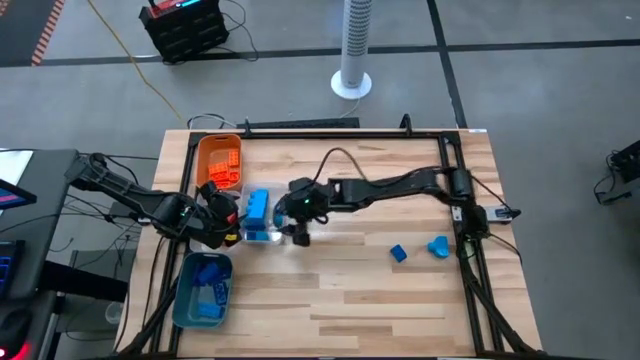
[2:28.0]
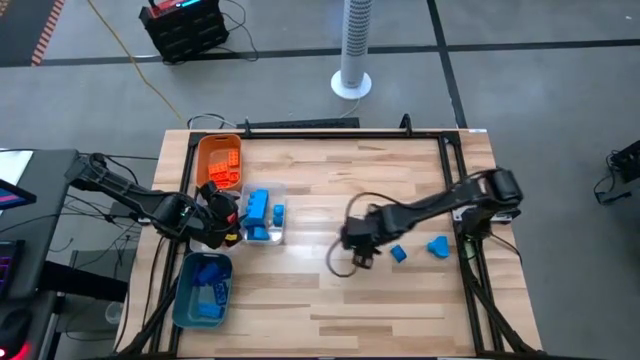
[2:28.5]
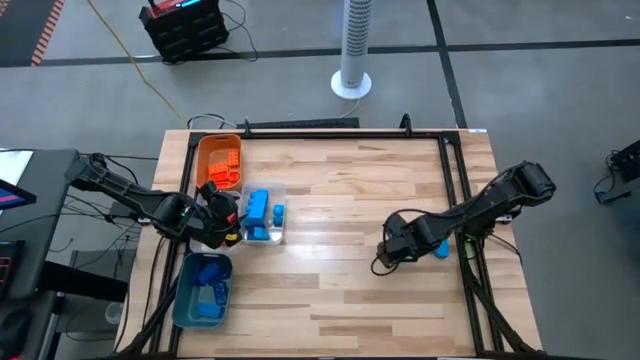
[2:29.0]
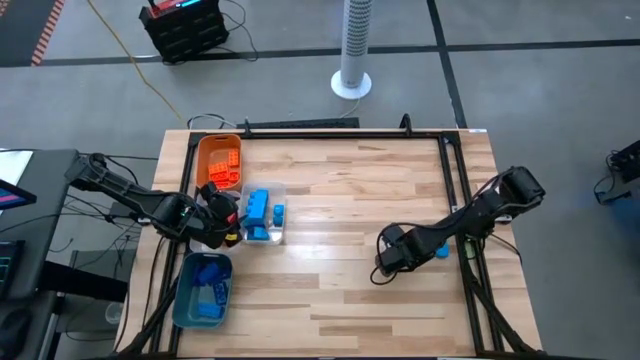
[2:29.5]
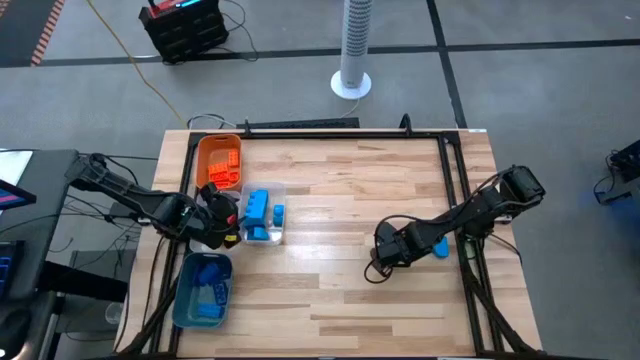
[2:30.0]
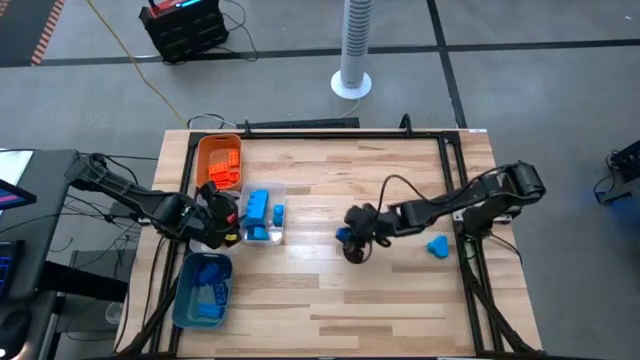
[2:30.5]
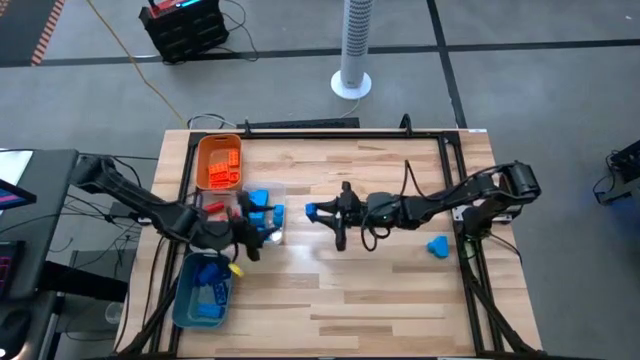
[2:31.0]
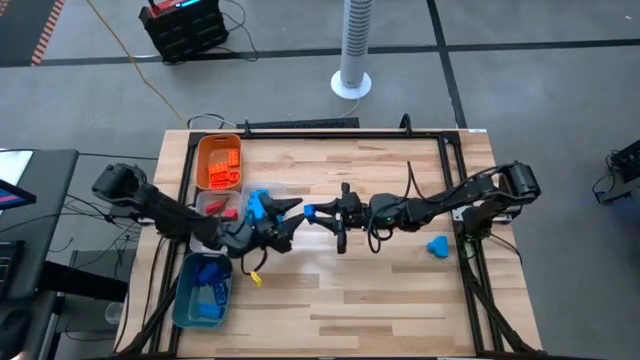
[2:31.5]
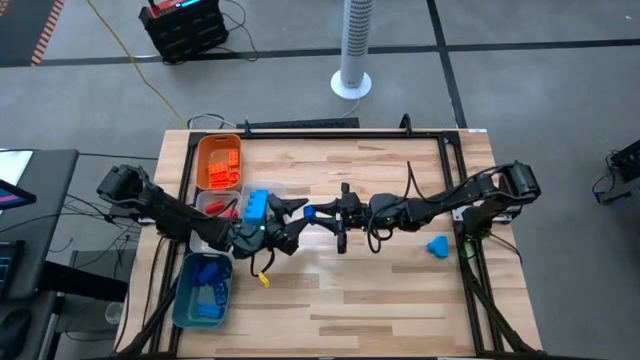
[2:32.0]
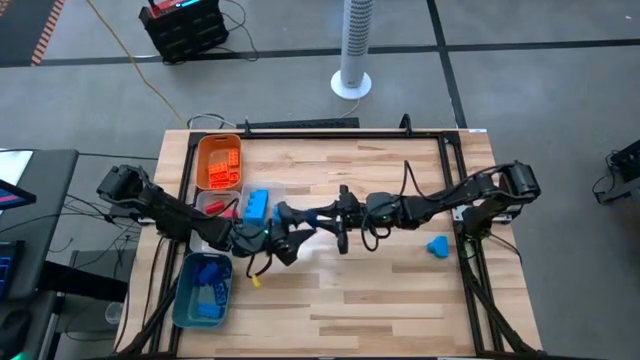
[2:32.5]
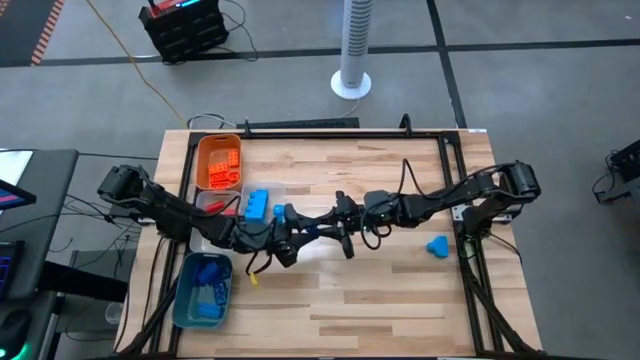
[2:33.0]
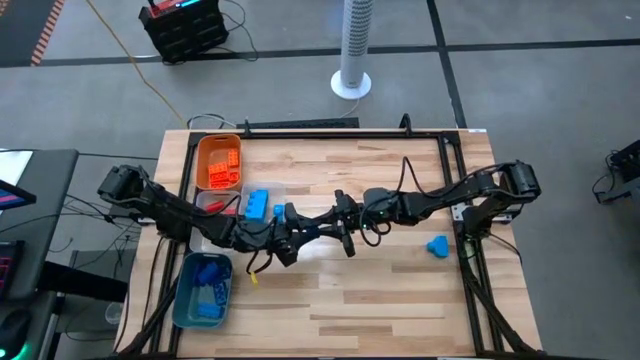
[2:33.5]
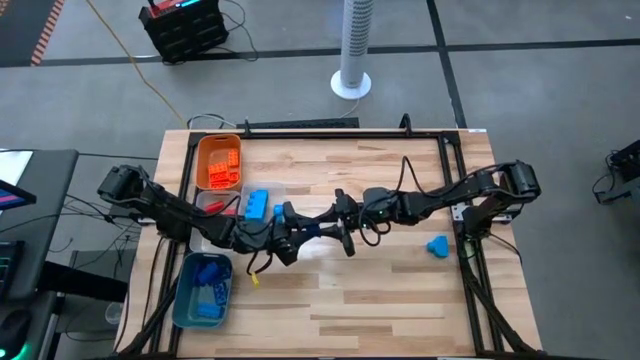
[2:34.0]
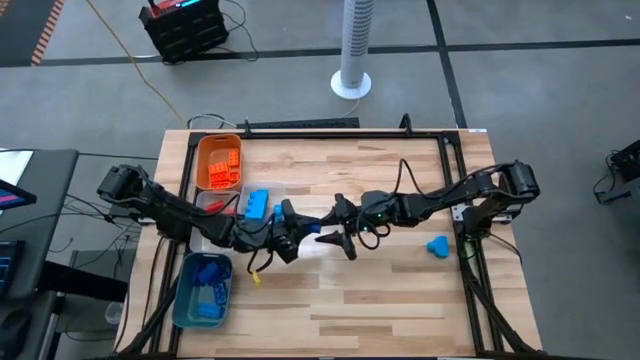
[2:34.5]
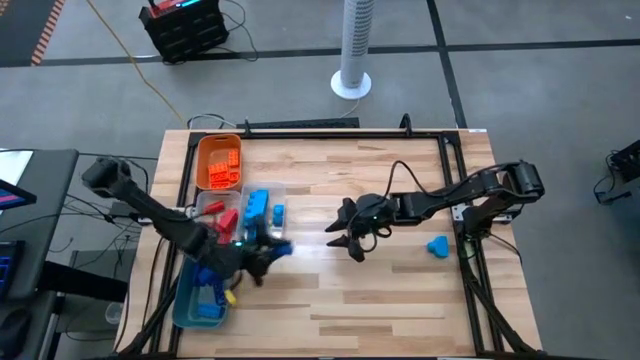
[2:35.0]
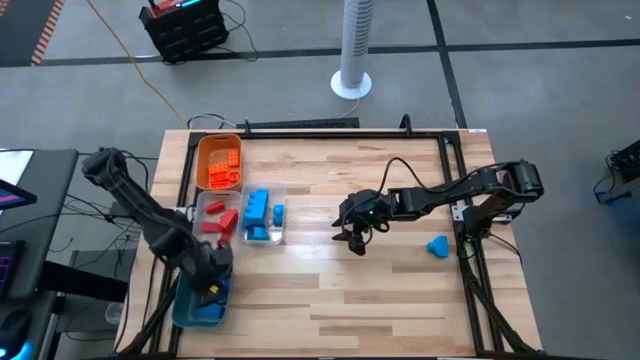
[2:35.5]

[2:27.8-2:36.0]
Task: Sort blocks
Put the blue game piece into the right blue bin

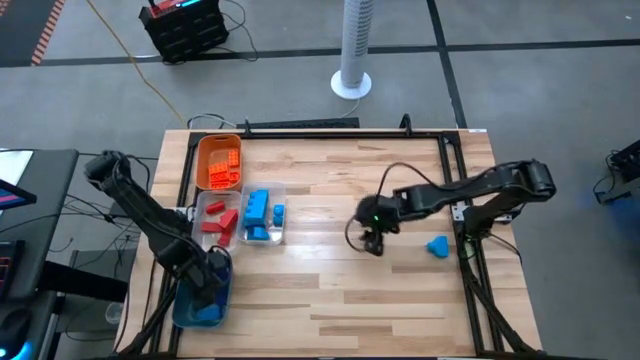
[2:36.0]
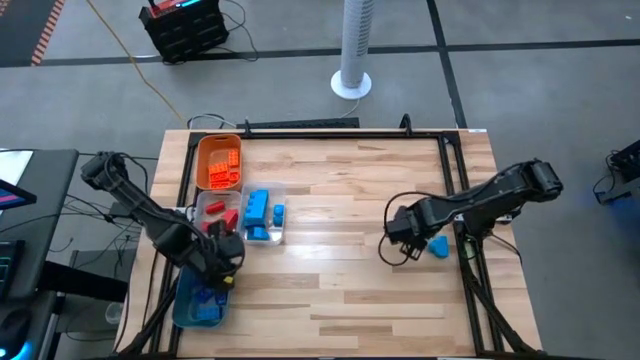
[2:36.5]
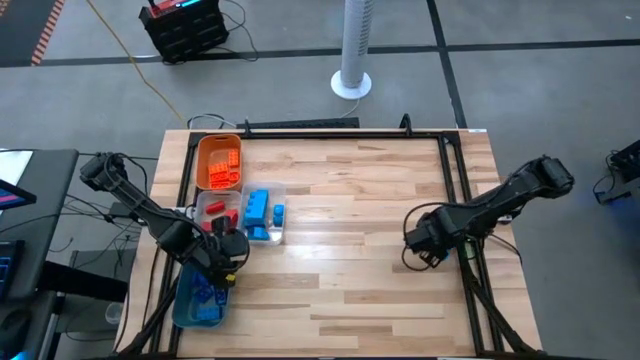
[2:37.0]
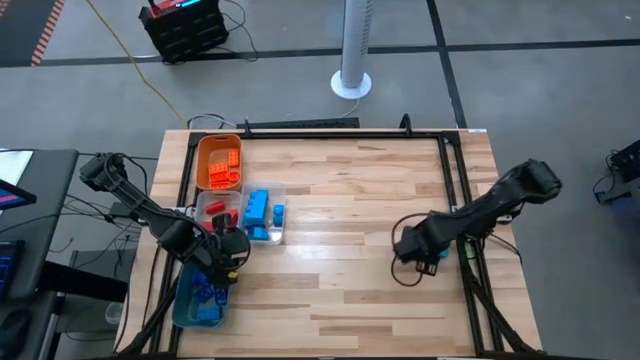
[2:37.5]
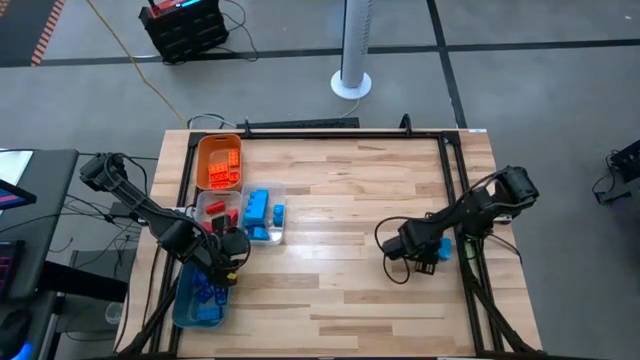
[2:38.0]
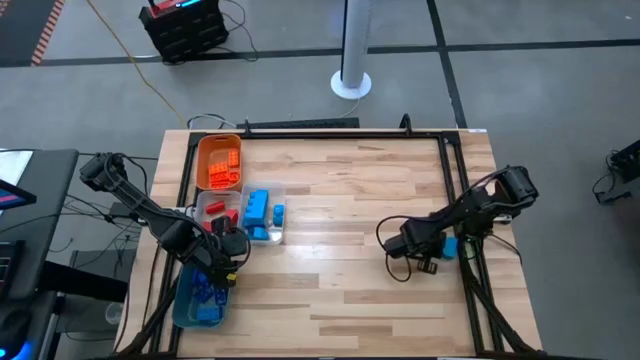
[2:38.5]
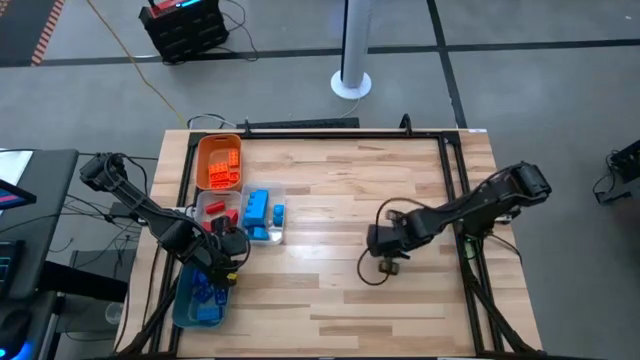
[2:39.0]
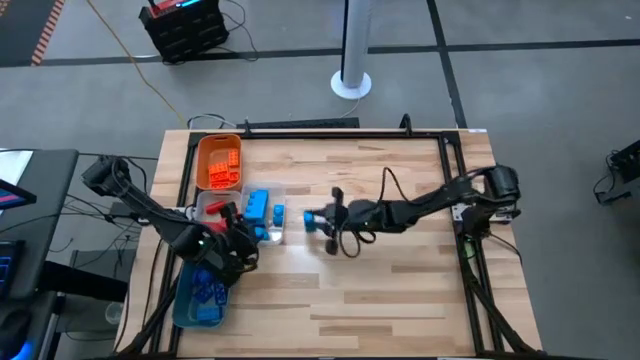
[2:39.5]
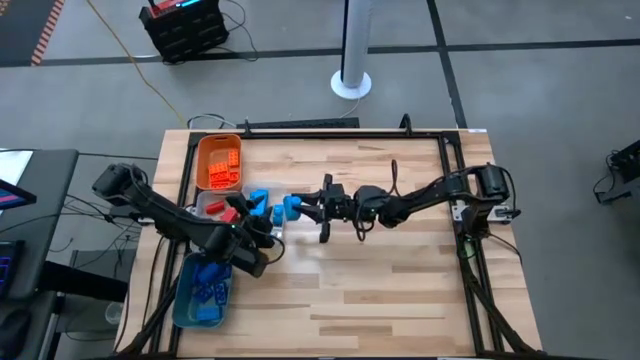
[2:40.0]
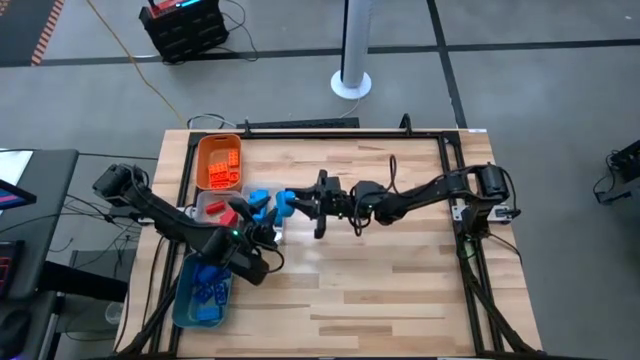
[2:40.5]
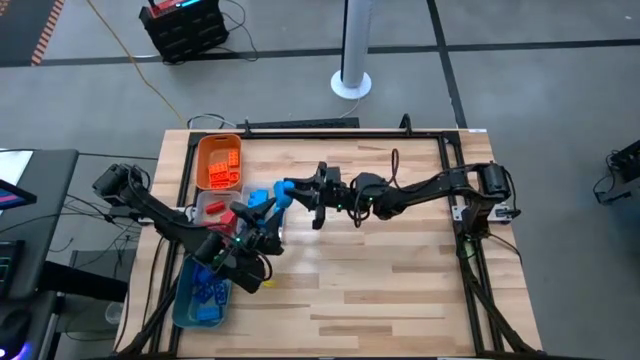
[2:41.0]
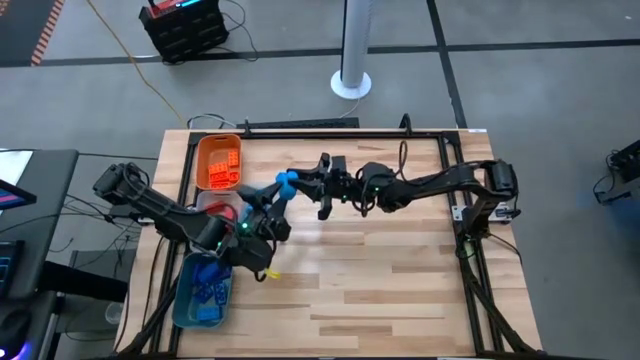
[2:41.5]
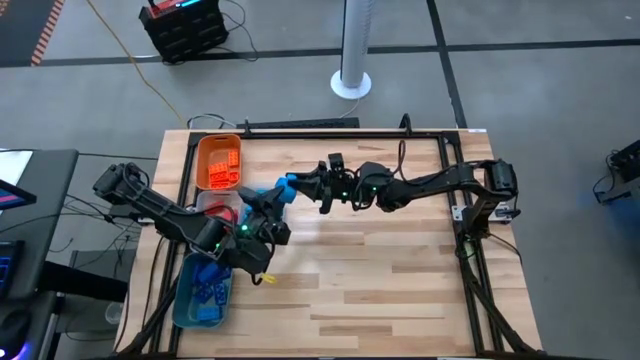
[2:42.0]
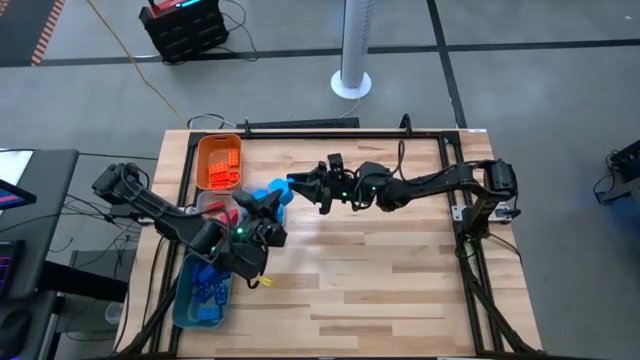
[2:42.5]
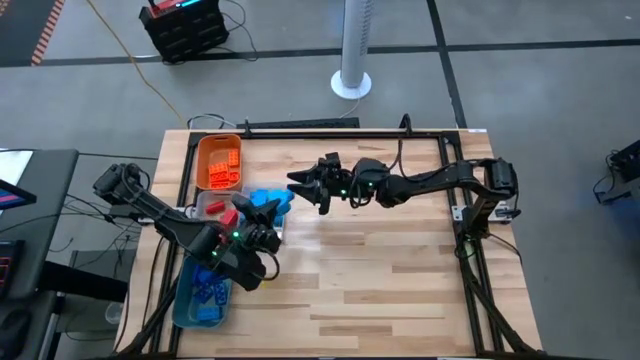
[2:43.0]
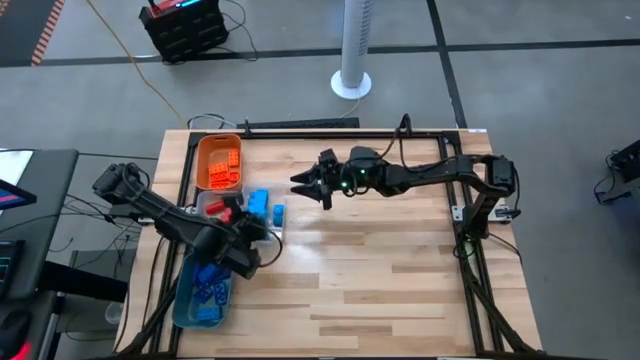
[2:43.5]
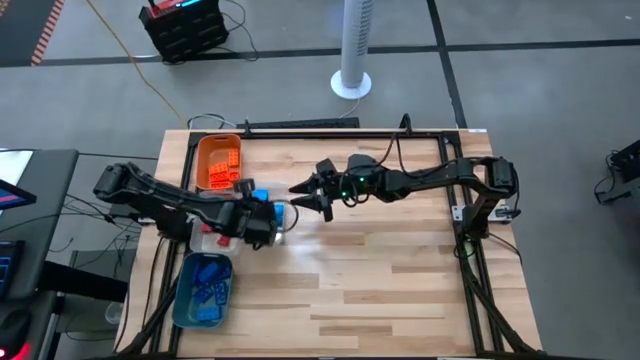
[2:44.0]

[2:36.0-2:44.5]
Put the light blue game piece into the right transparent bin

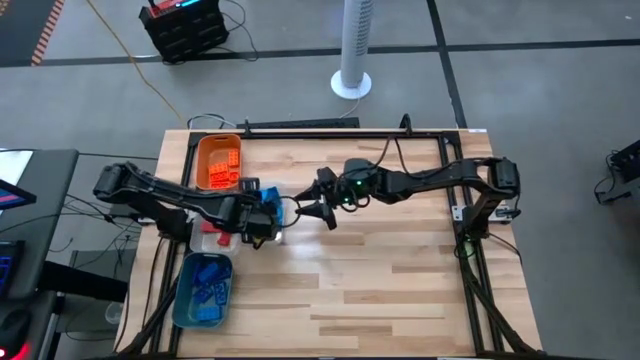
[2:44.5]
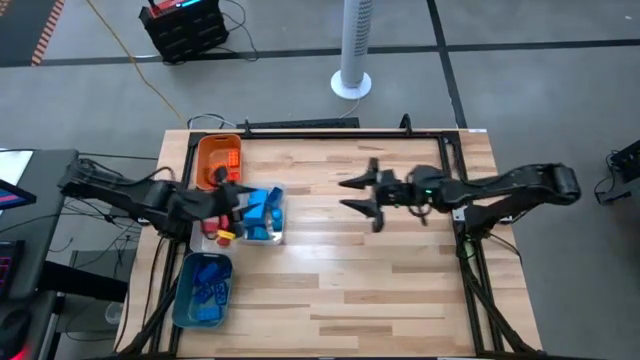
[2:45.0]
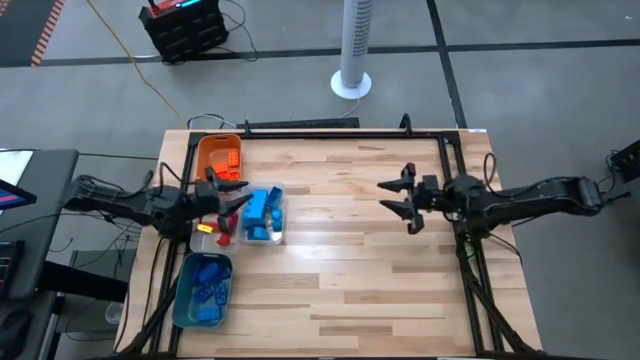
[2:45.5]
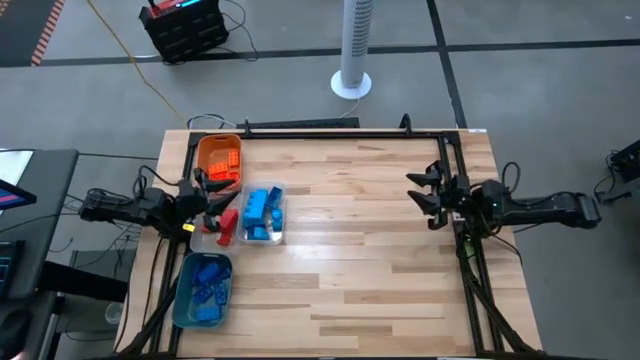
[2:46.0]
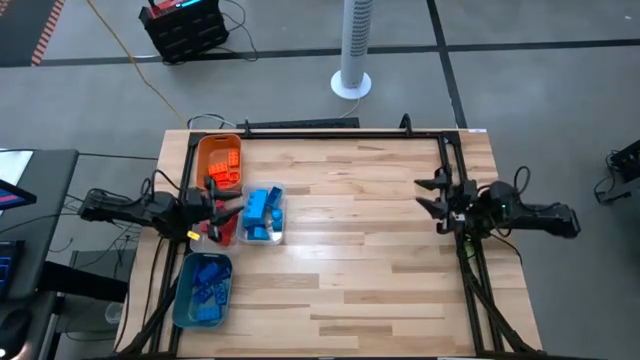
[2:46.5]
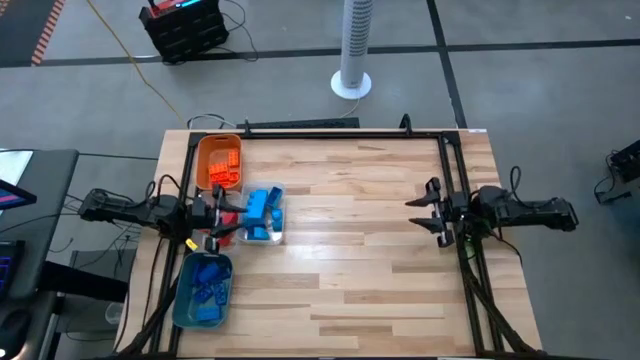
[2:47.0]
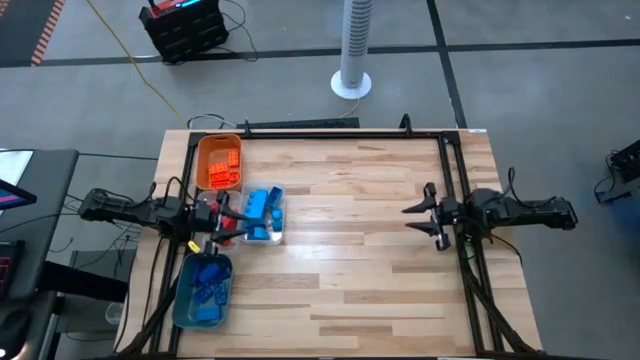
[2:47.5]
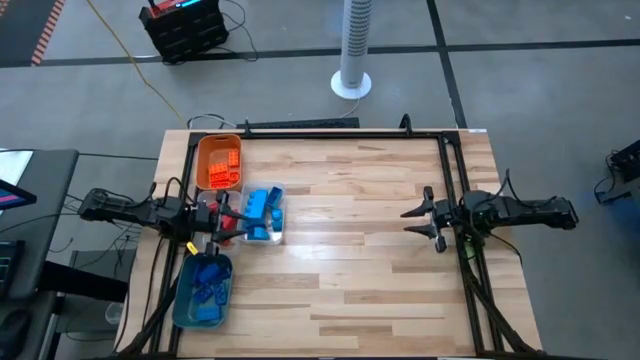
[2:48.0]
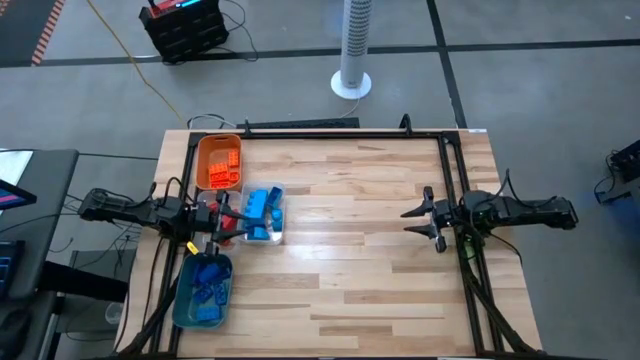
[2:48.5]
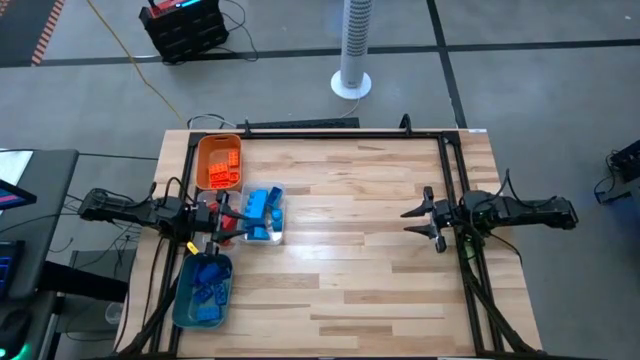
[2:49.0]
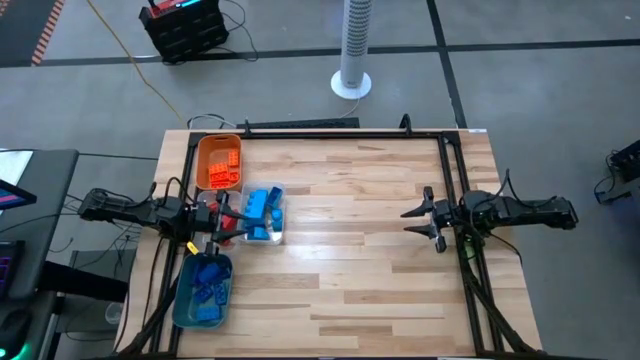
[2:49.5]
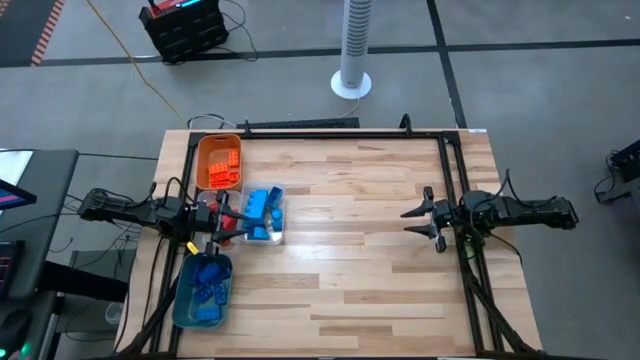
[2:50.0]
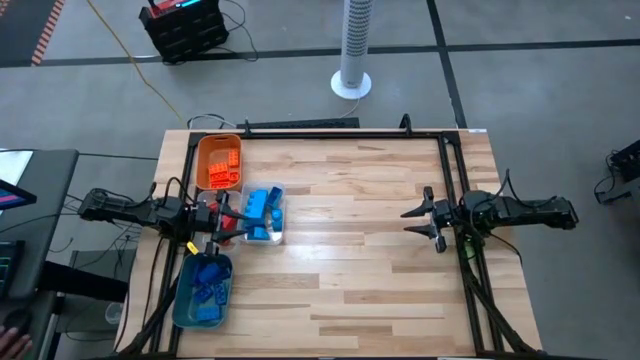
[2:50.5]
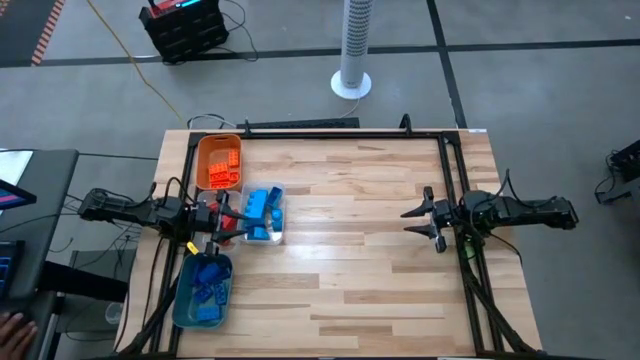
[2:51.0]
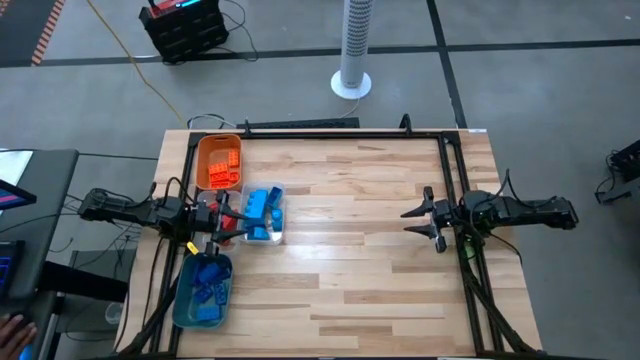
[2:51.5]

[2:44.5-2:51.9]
Return to Home Position
